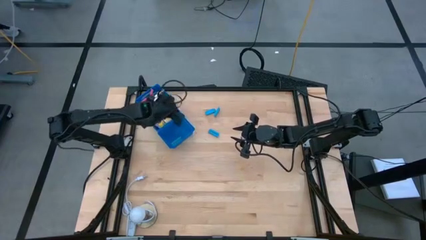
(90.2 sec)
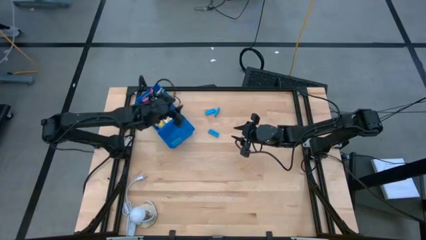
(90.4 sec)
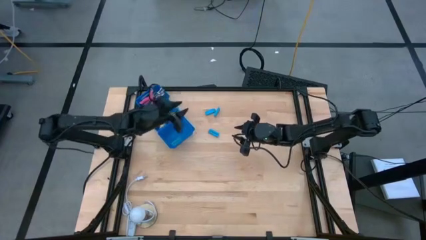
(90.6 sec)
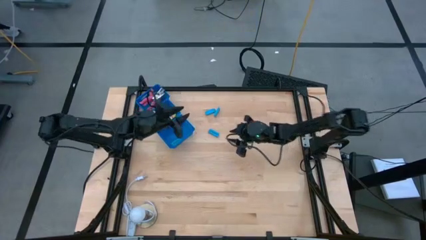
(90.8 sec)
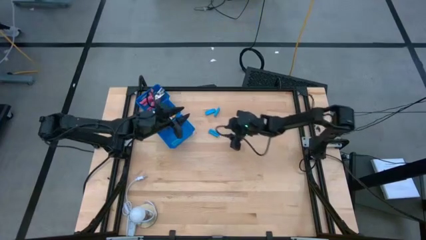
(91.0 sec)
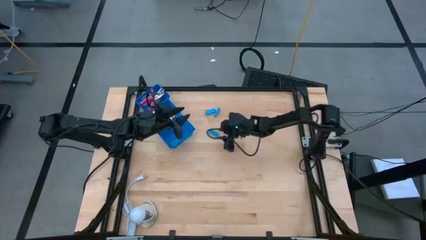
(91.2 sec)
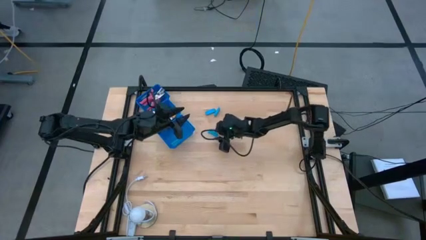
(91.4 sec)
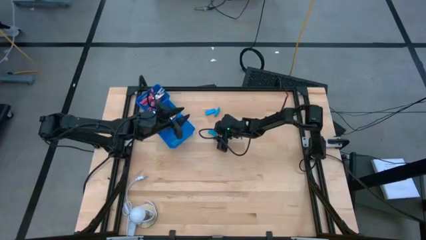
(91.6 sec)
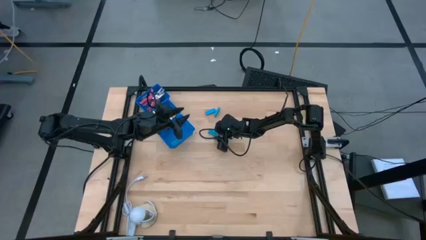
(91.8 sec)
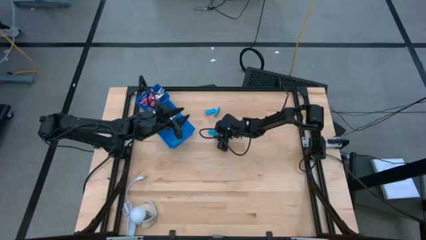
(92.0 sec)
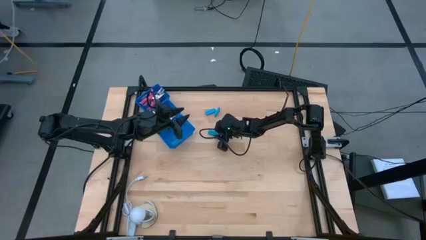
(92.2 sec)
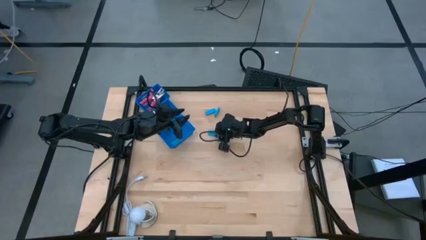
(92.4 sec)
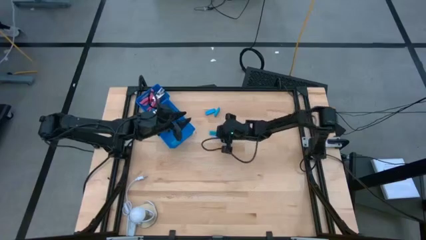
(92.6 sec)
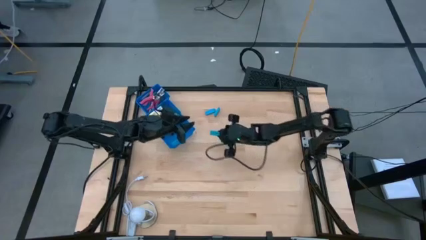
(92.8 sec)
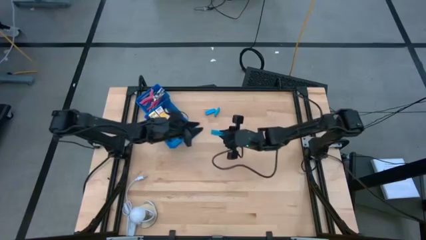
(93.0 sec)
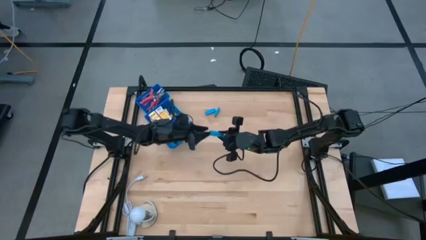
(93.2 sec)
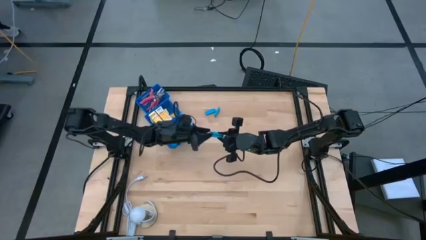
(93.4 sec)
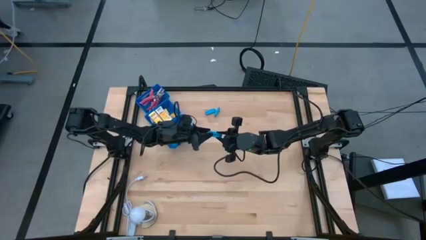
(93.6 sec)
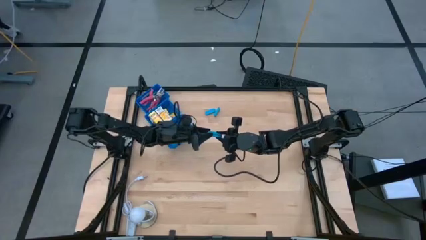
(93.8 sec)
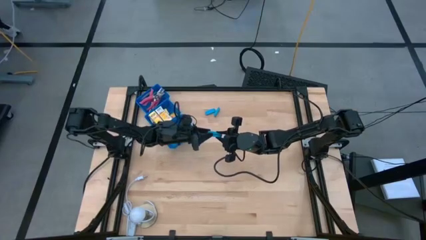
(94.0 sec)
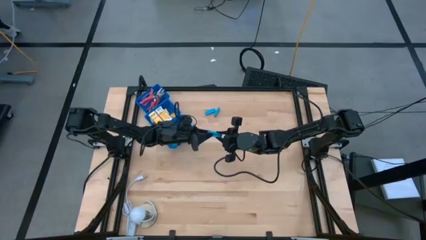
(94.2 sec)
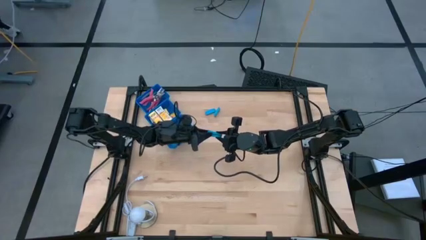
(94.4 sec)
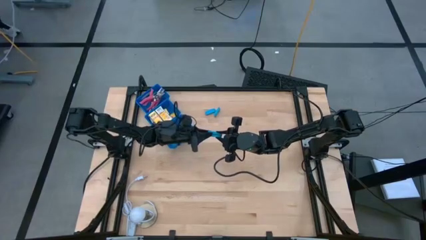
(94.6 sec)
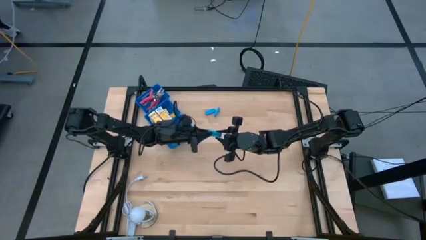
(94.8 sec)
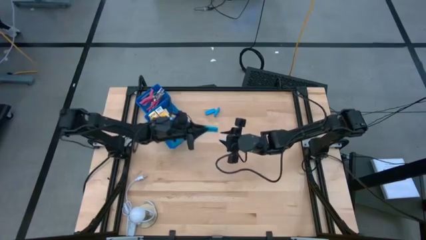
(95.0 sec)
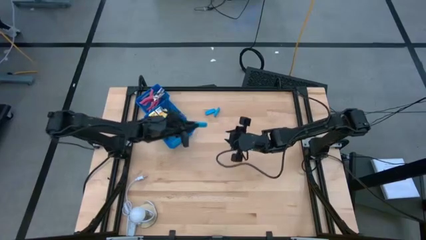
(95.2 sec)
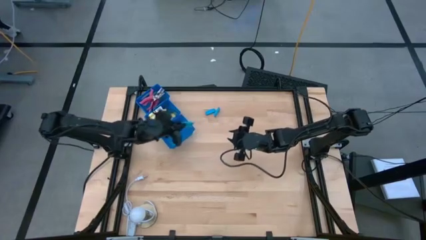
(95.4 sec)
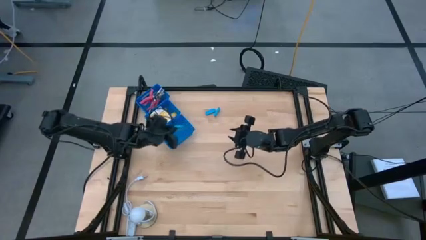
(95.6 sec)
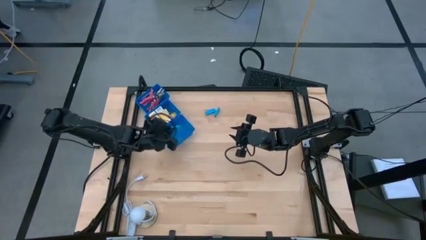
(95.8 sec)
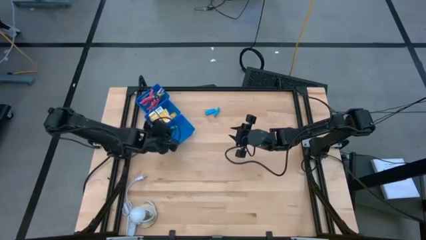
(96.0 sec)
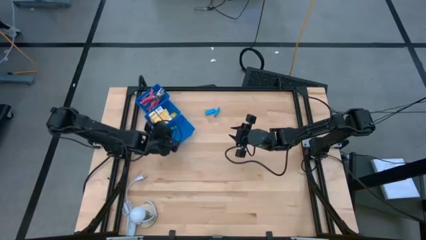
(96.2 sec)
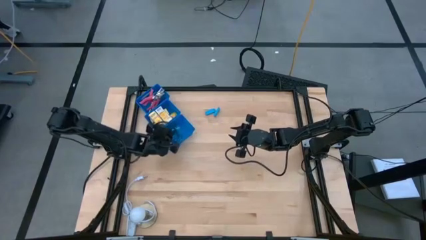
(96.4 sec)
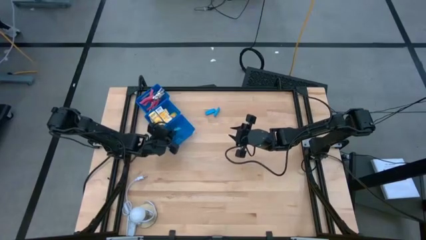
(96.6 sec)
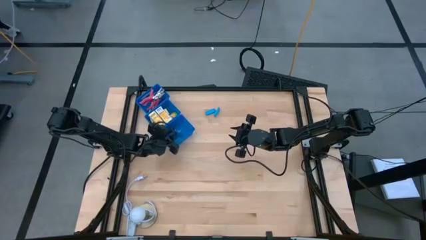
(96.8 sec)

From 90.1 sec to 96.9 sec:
Task: Pick & Place School Supplies
Put the blue eraser into the bottom blue bin

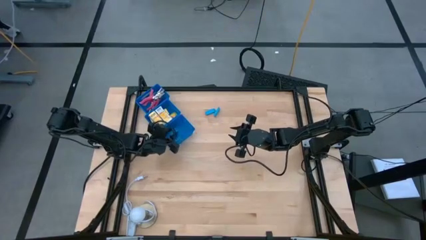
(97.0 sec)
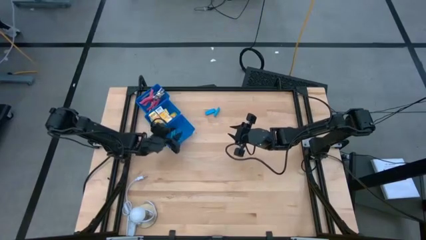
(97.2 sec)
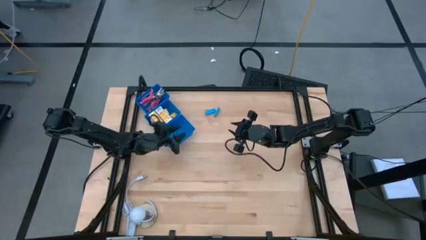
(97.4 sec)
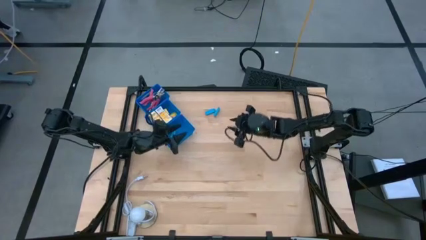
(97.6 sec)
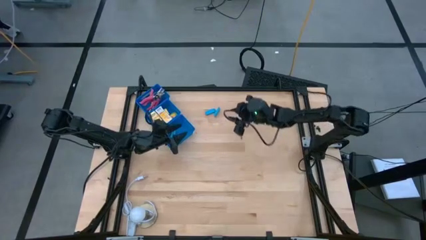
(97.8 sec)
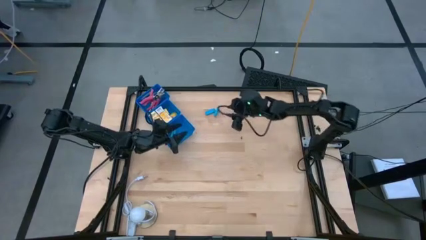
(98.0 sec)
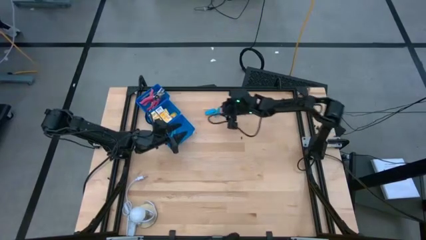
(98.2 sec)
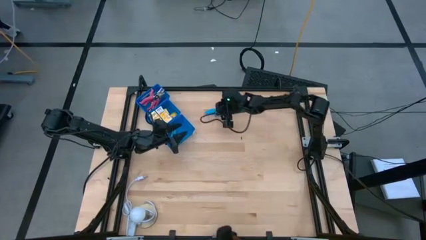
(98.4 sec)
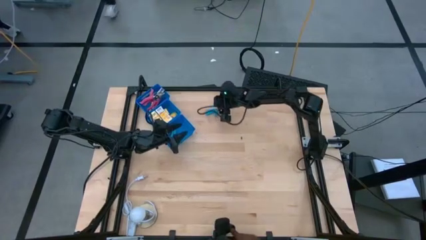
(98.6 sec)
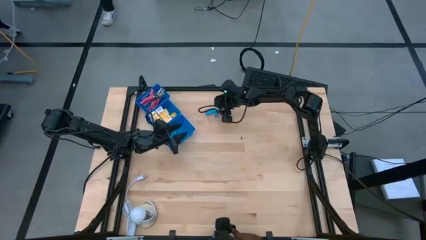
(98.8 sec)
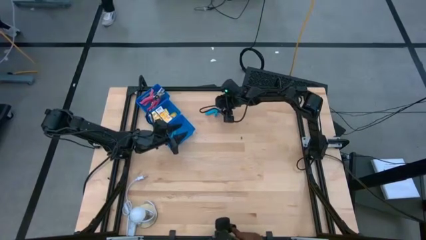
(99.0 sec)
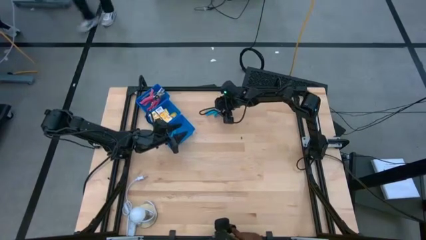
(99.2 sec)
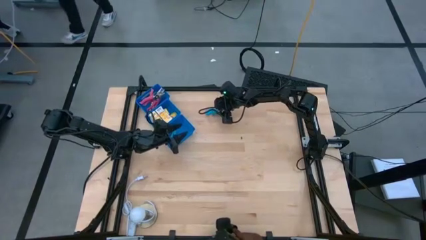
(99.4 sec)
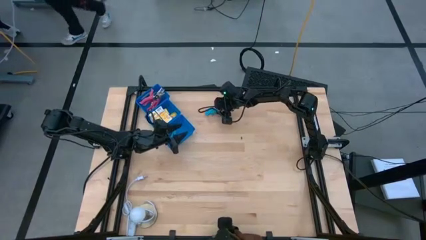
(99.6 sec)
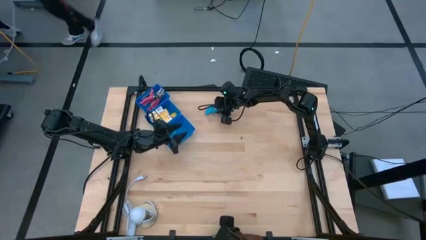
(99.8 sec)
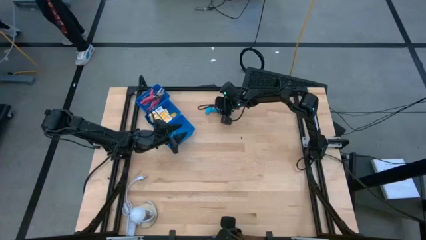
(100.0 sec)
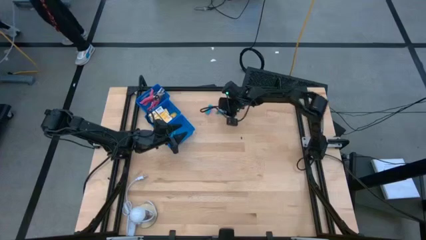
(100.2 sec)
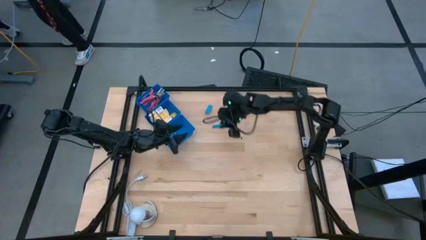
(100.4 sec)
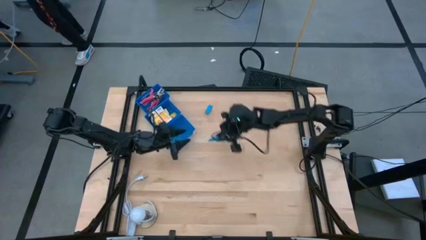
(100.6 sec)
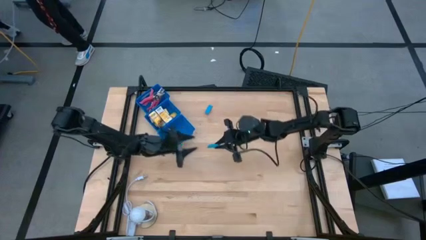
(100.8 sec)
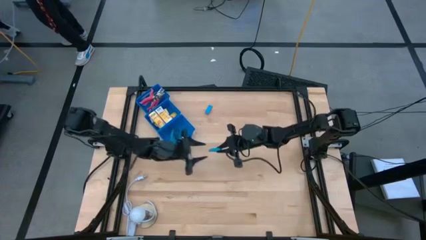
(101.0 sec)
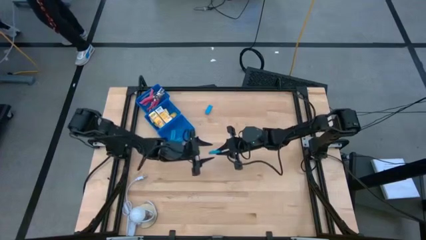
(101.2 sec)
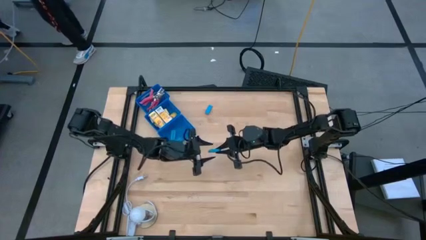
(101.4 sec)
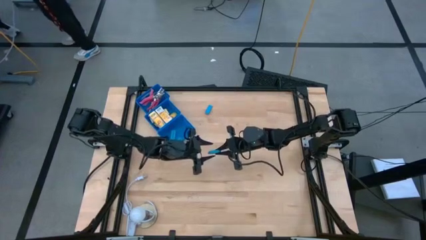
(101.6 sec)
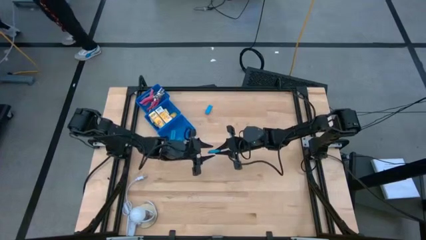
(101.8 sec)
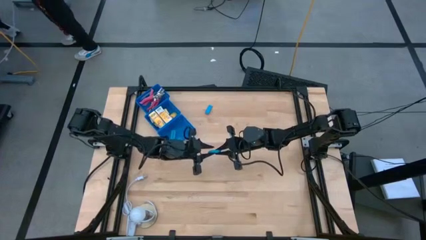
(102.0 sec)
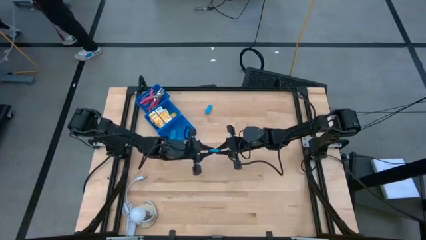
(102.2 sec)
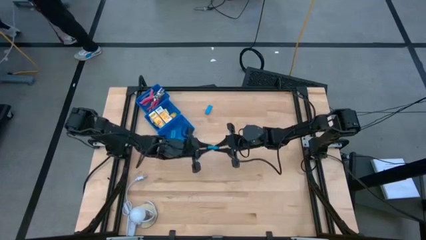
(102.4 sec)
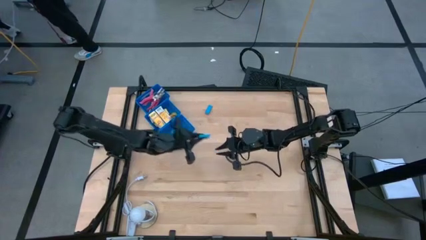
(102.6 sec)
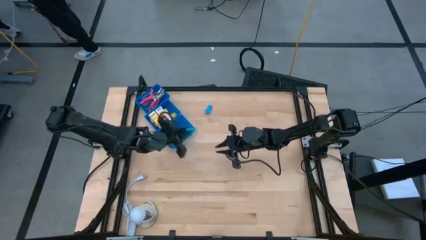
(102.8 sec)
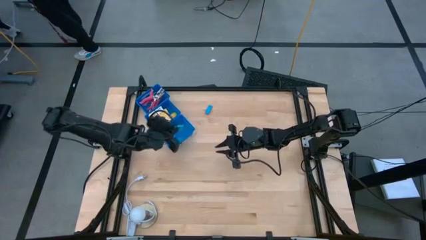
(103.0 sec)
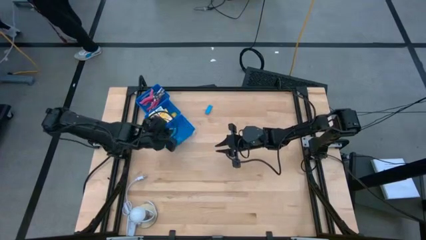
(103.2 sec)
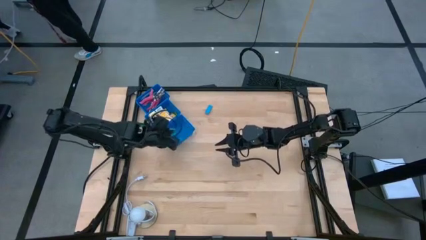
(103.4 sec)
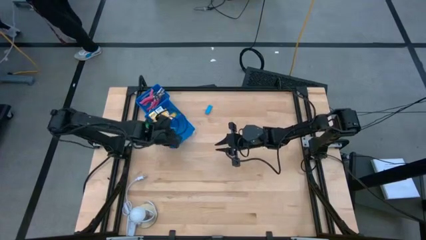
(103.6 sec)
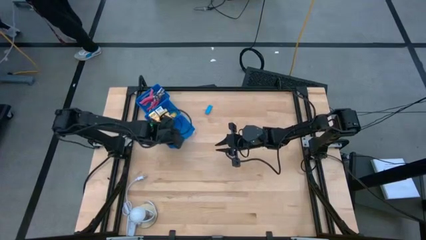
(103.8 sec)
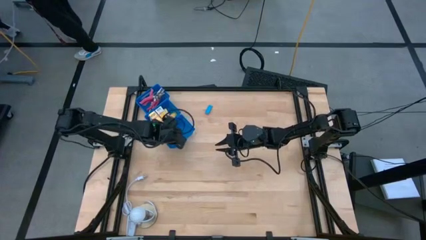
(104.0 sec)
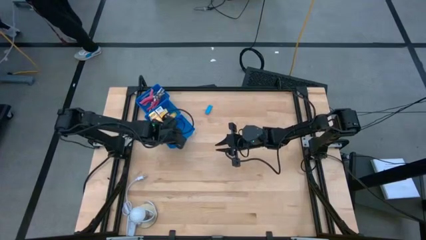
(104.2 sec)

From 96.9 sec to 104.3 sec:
Put the blue eraser into the bottom blue bin

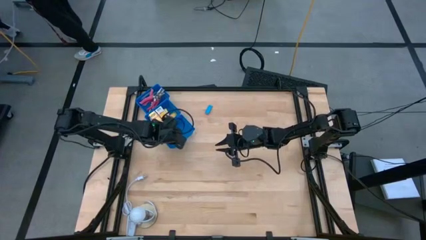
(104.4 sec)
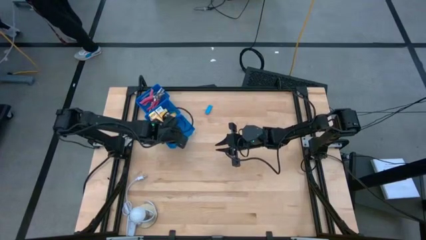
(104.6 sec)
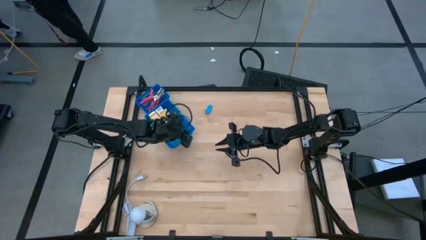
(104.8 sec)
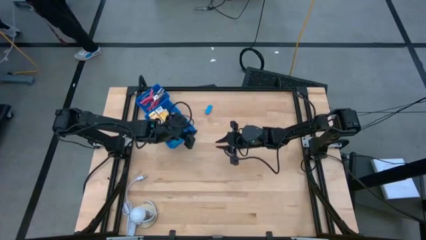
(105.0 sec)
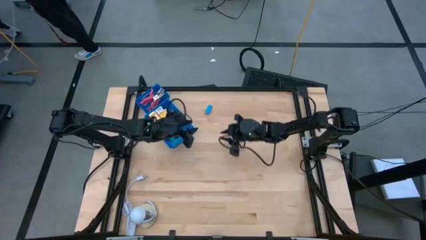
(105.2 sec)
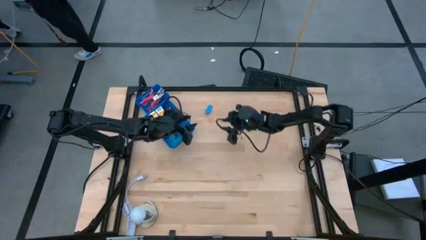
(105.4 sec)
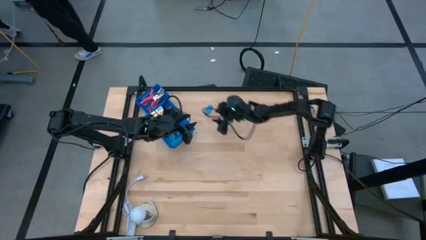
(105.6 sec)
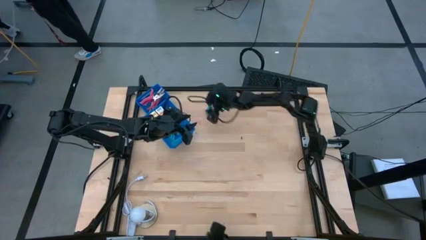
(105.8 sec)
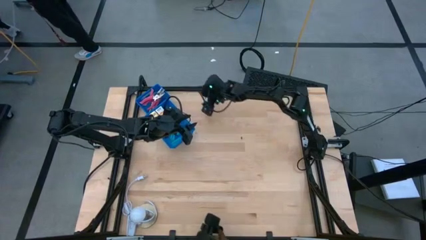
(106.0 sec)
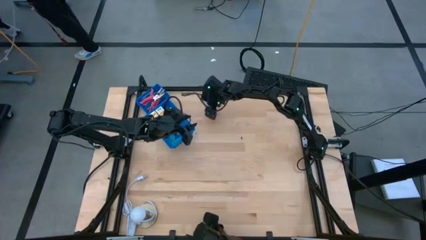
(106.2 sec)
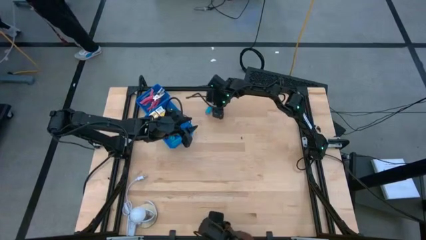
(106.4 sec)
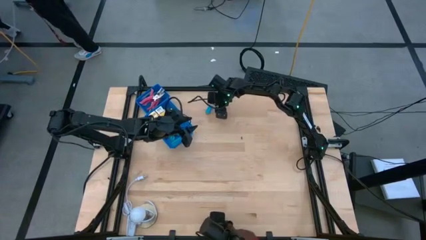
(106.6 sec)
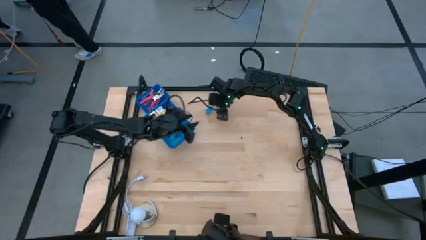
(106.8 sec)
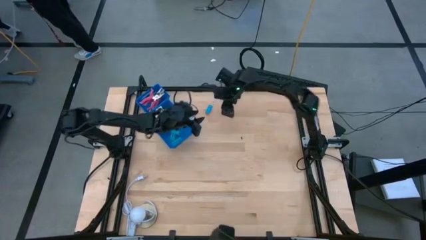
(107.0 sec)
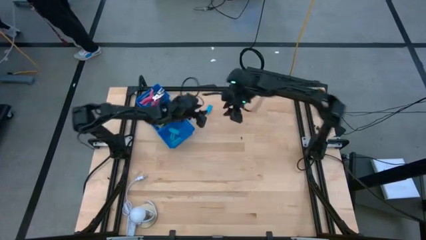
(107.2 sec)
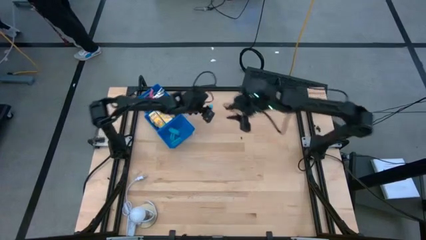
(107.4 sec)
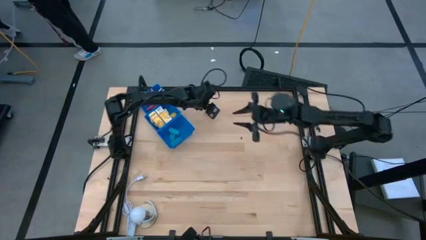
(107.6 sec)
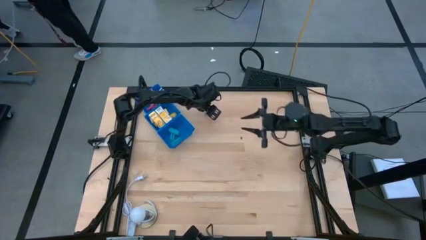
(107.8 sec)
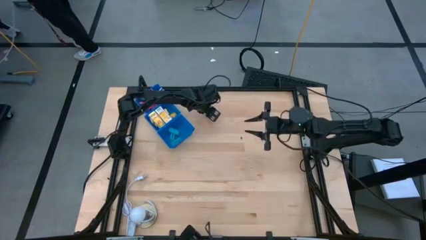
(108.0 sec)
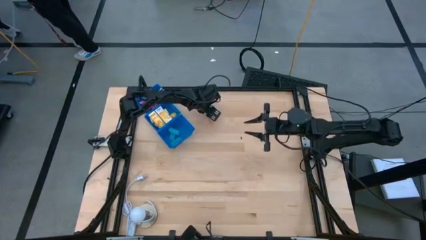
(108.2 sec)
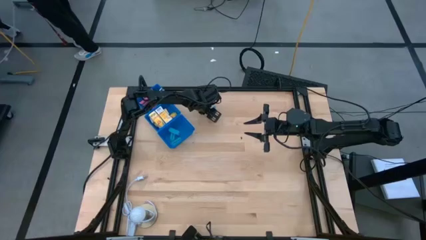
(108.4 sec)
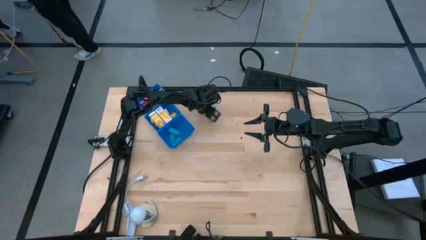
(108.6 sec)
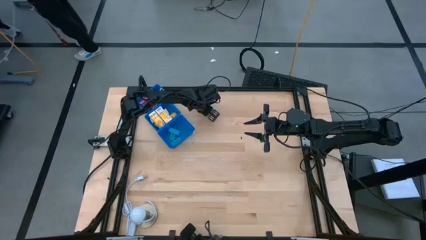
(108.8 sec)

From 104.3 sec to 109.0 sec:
Put the blue eraser into the bottom blue bin
